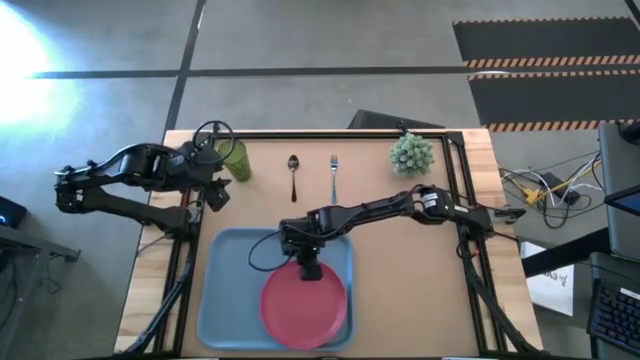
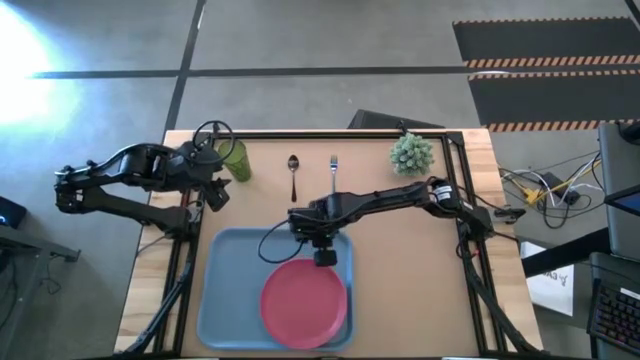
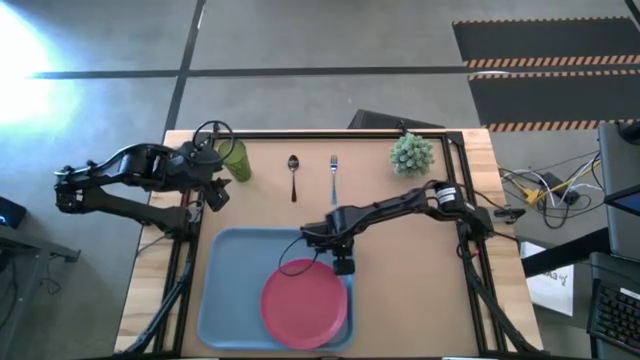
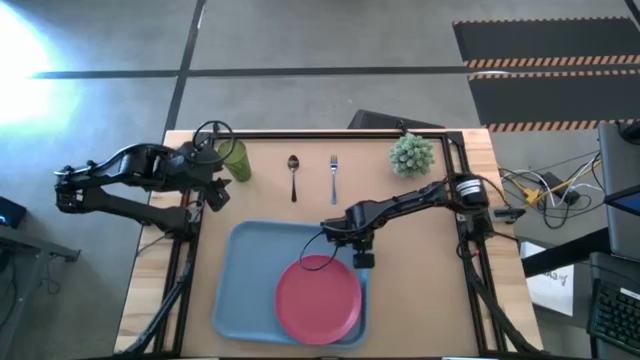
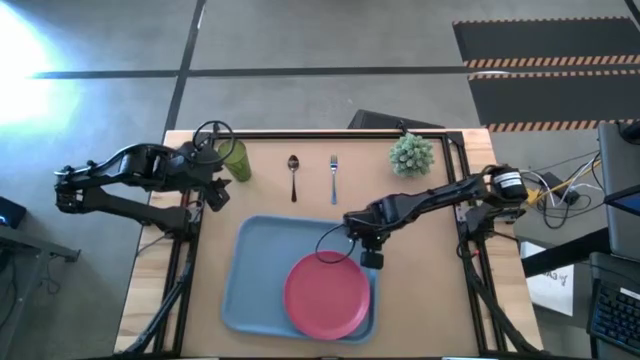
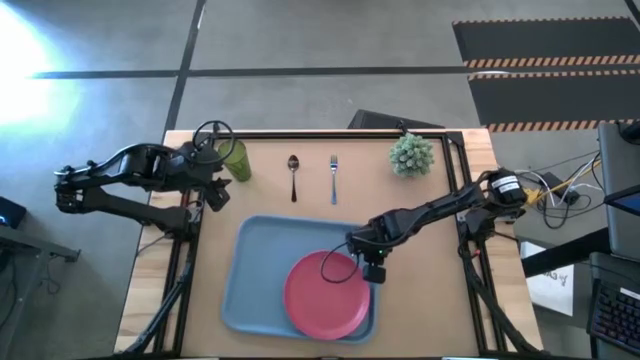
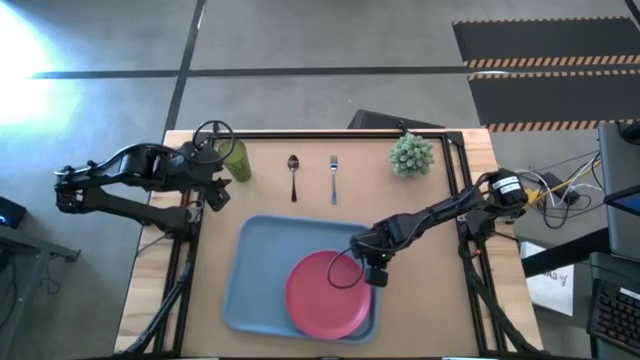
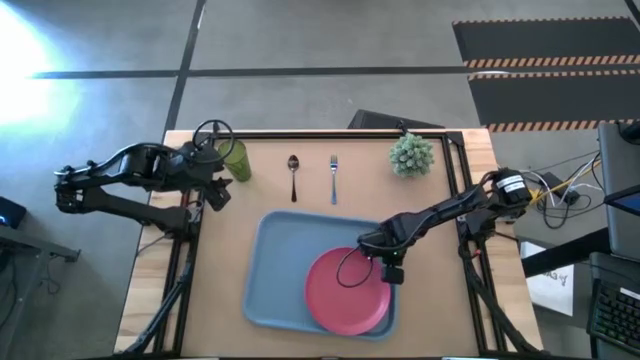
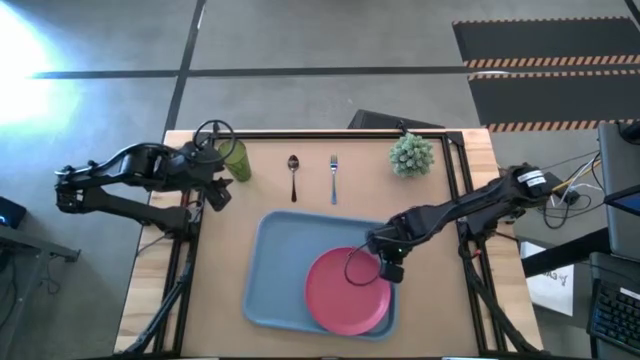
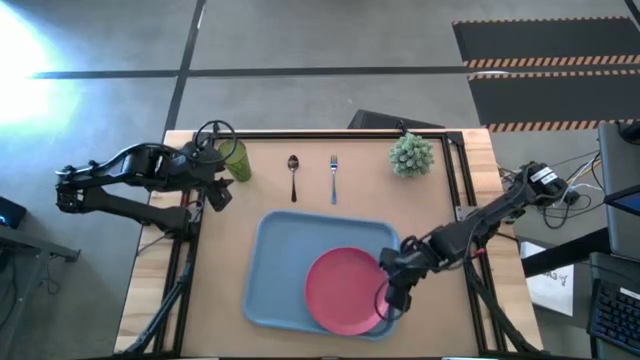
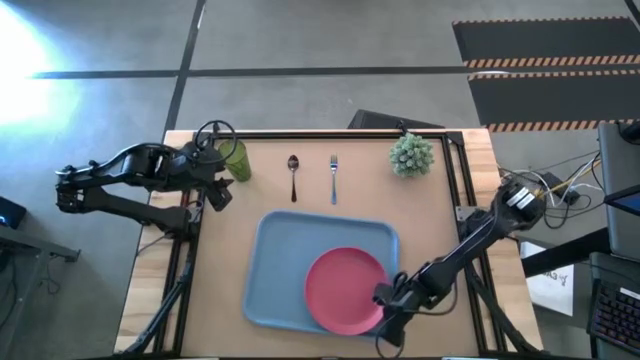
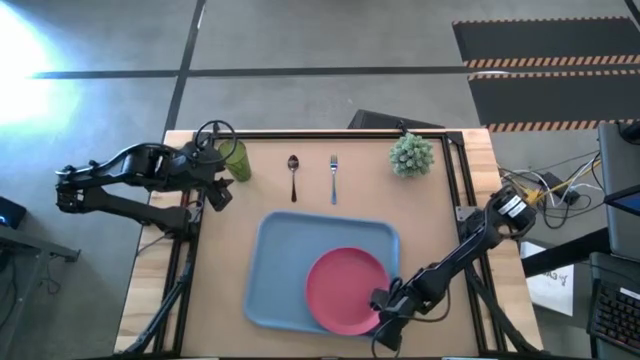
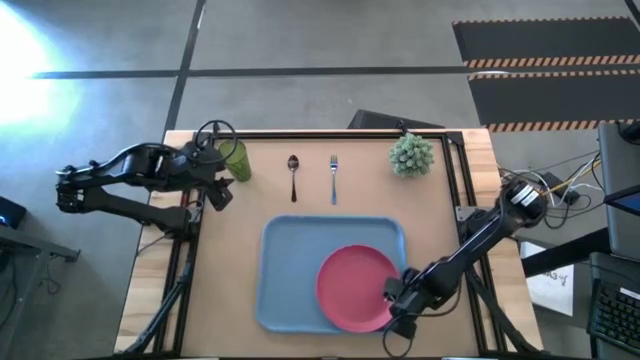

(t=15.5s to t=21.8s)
Task: Pick and place plate/cup/fork/spoon on tray
Move the blue serving tray to the center of the table

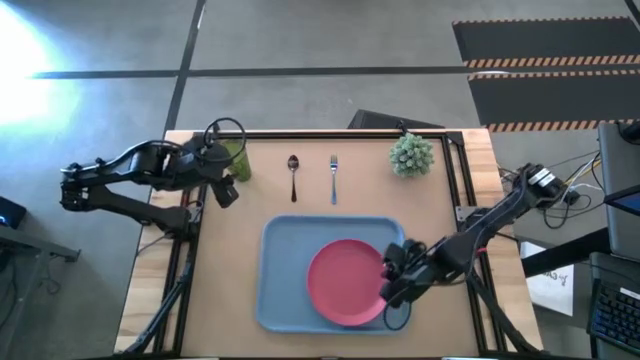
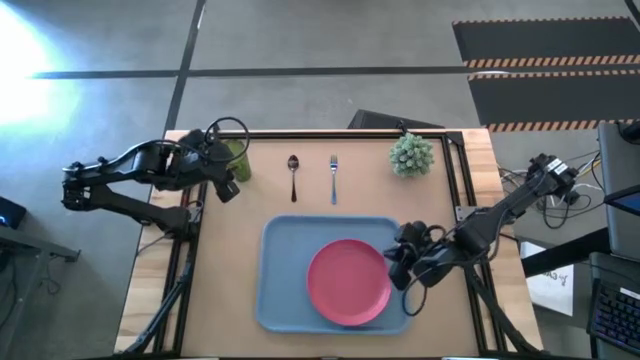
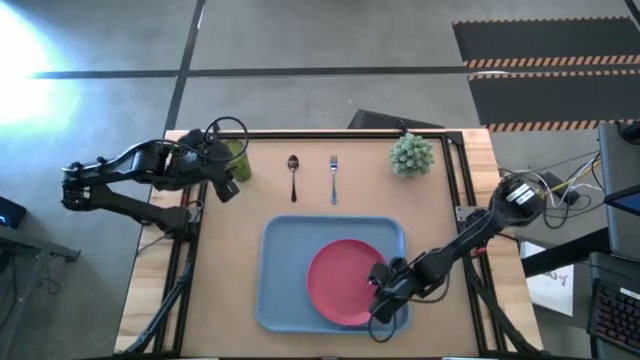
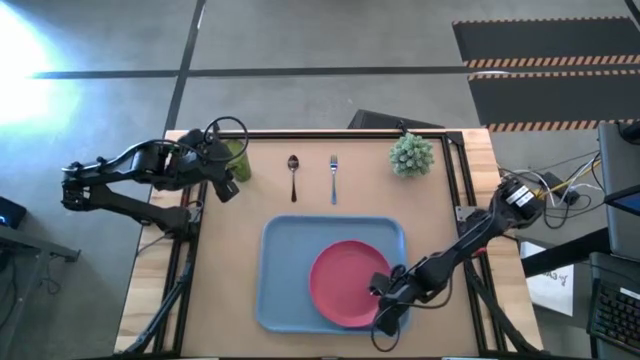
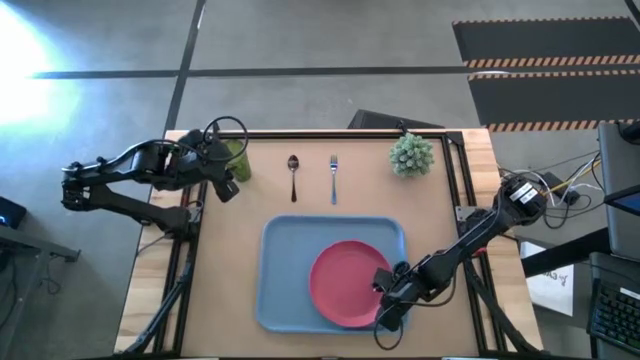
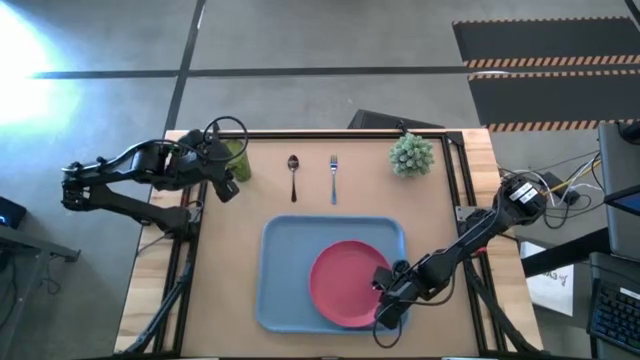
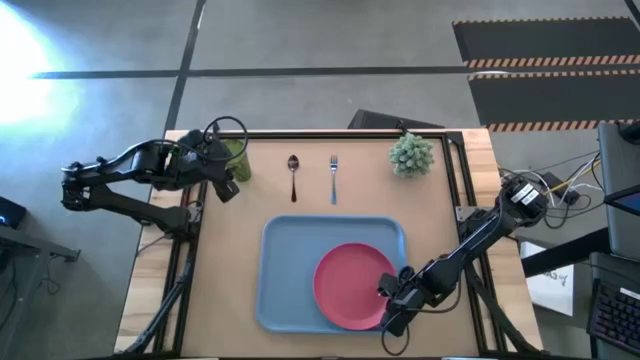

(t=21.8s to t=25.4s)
Adjust the pink plate on the blue serving tray

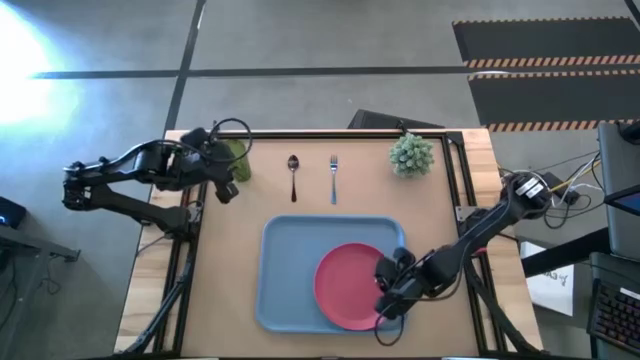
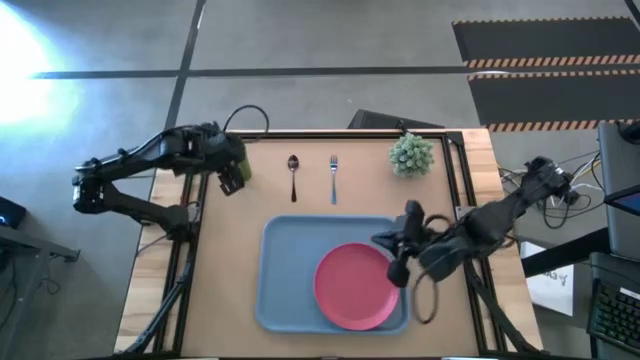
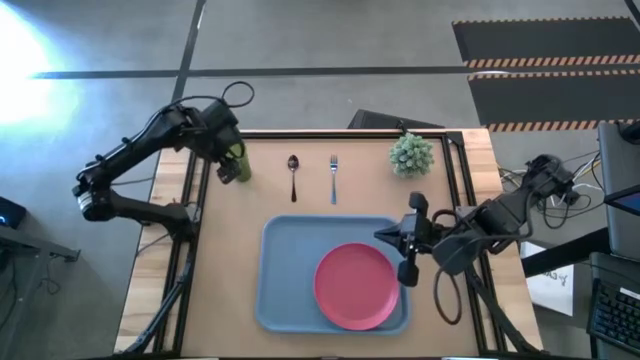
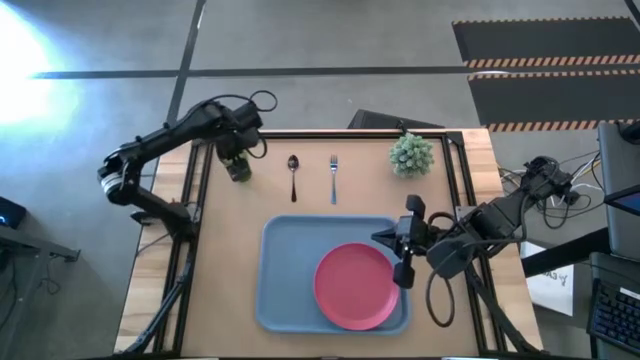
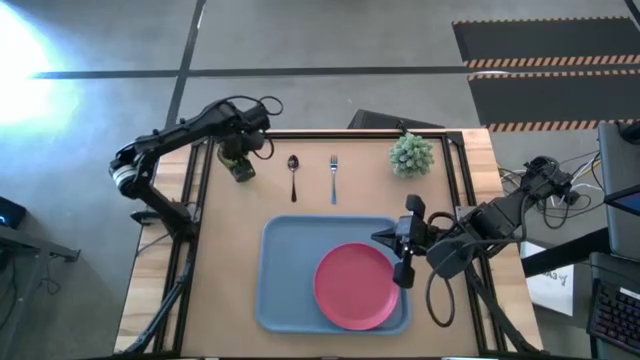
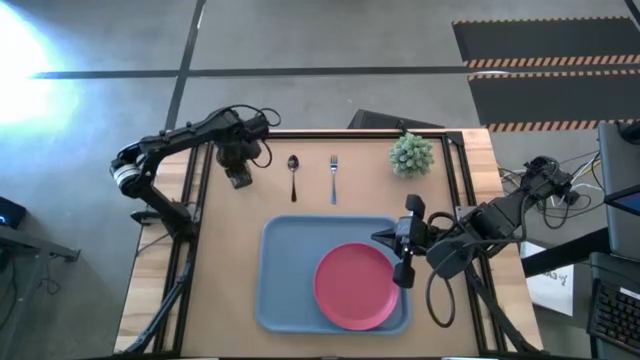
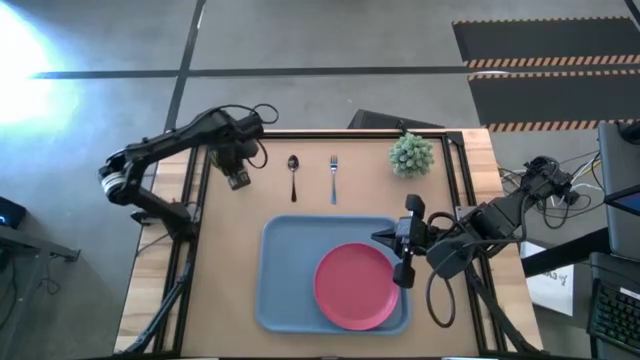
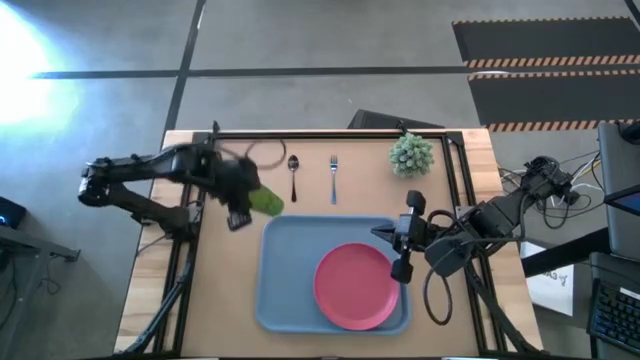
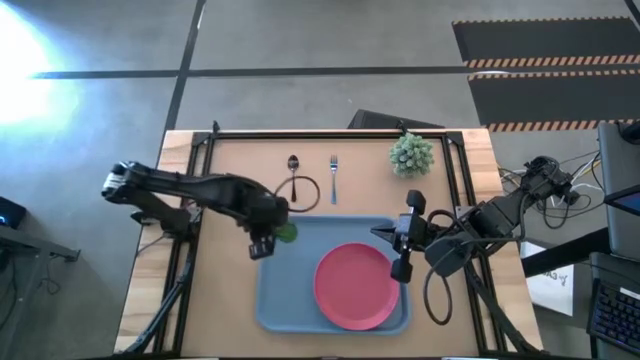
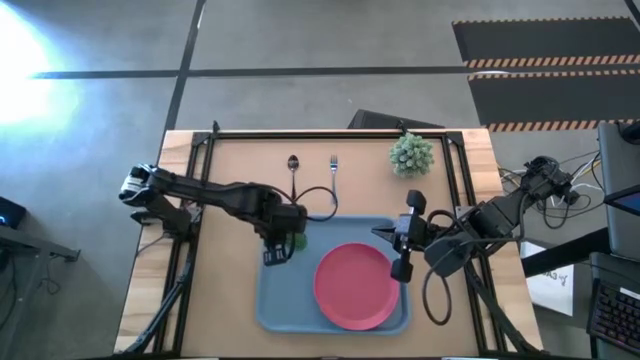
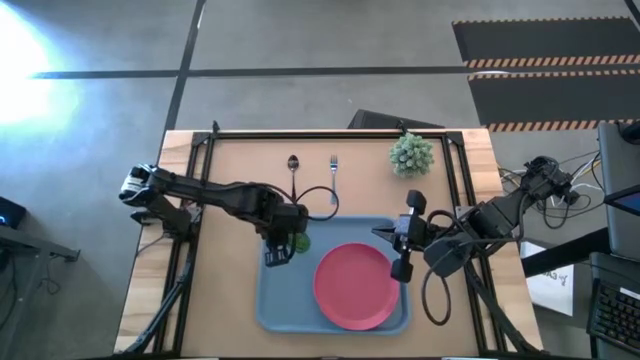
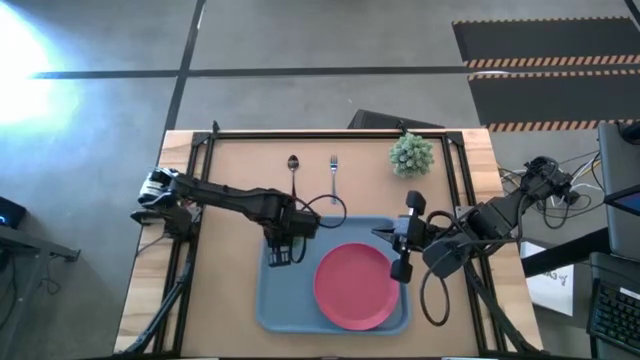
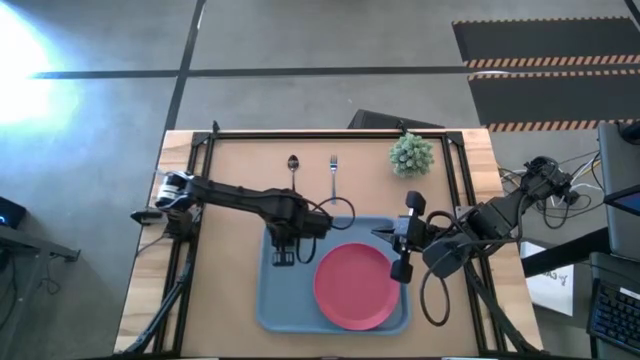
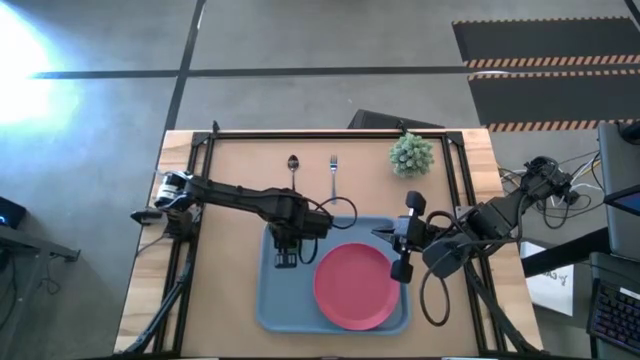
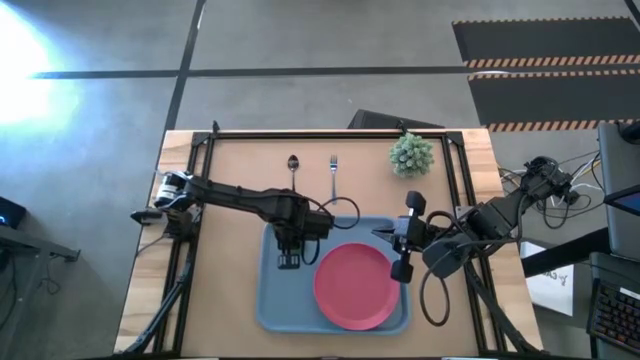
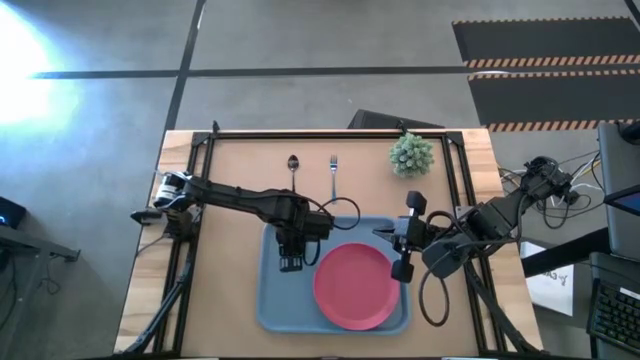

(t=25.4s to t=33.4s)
Put the green cup on the blue serving tray on the top right of the pink plate

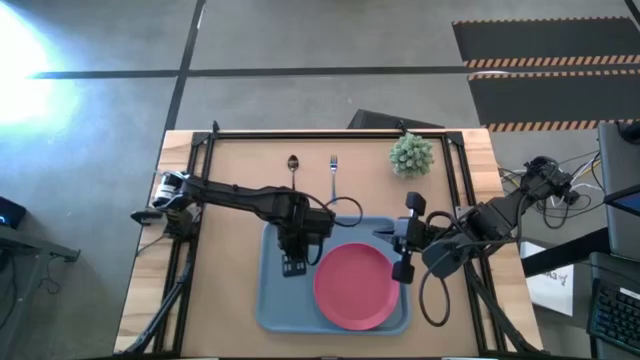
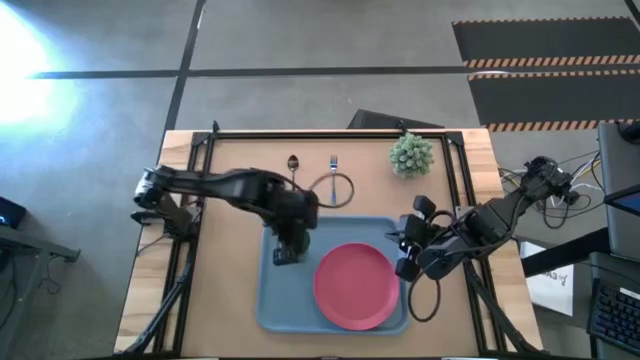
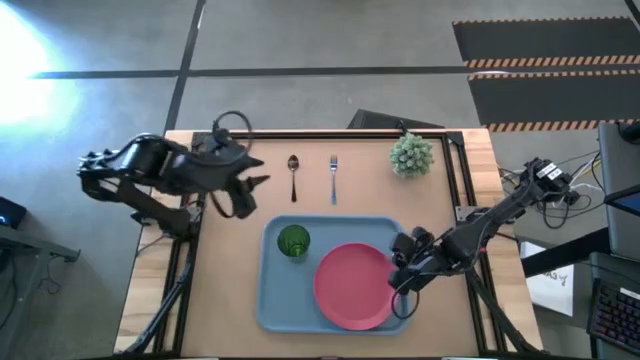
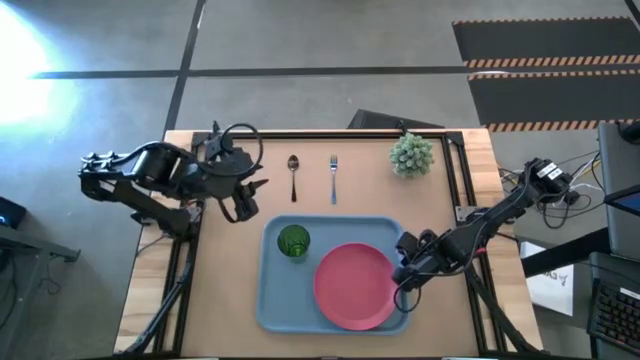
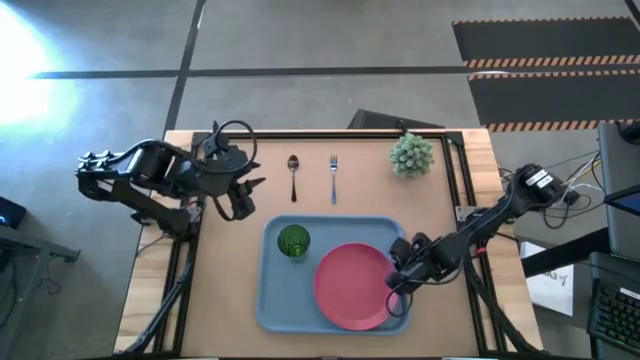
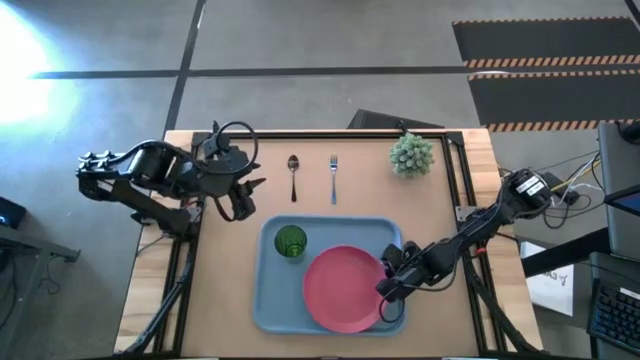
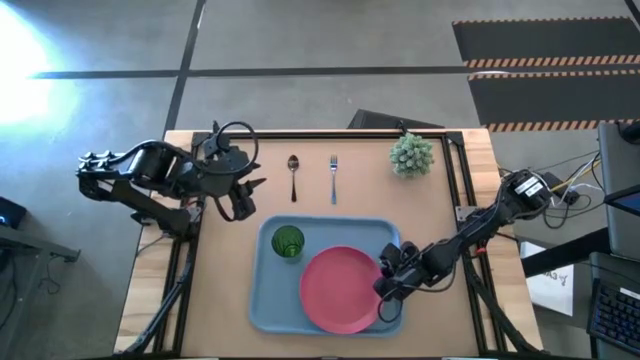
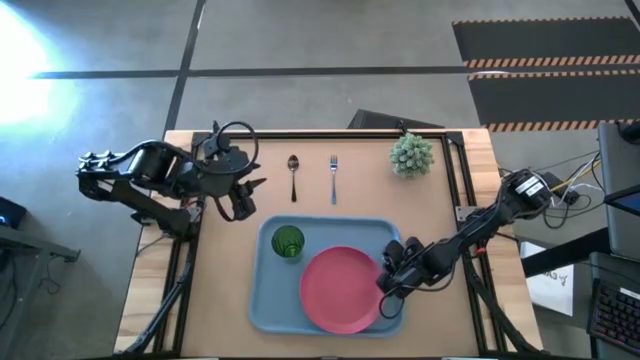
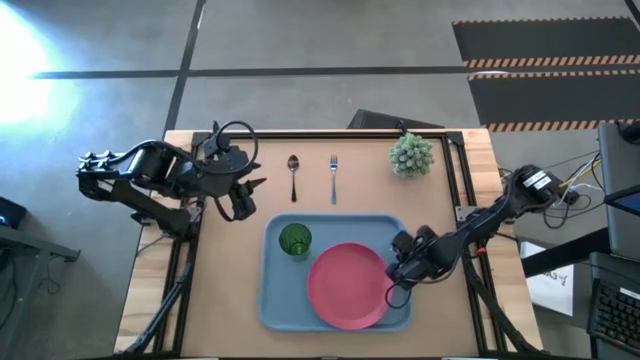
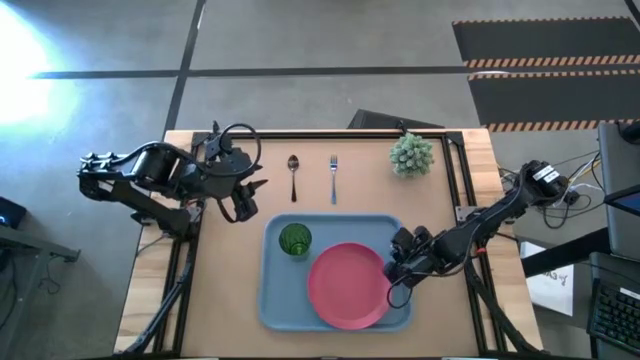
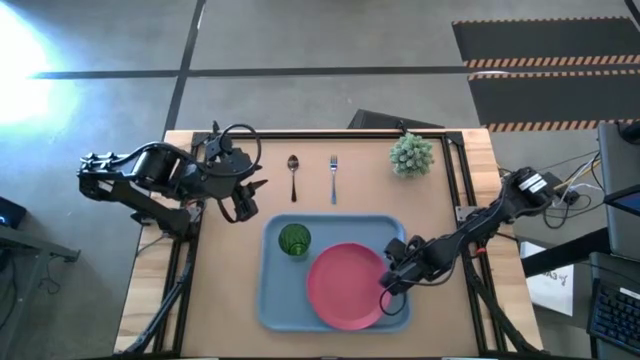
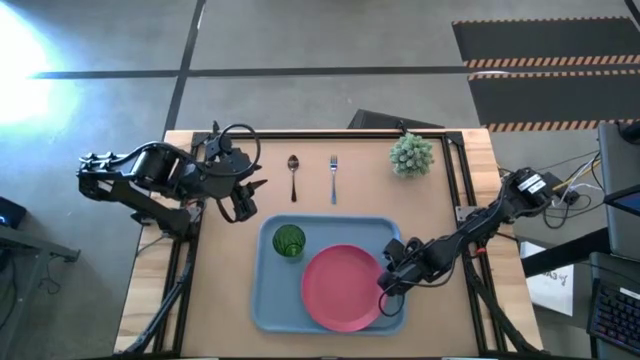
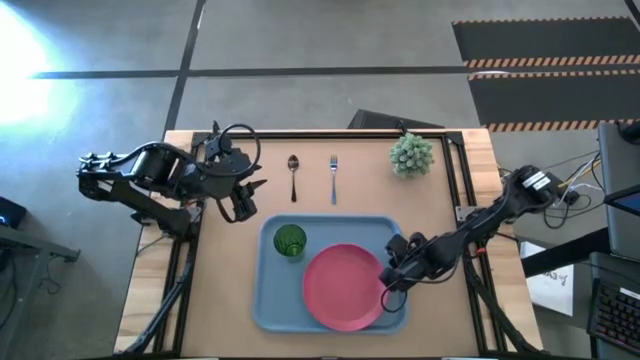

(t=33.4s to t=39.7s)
Adjust the pink plate and the blue serving tray
